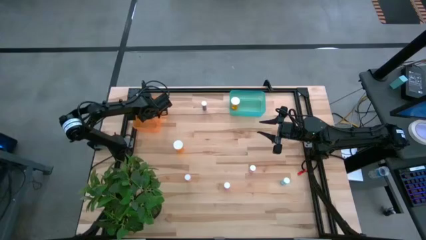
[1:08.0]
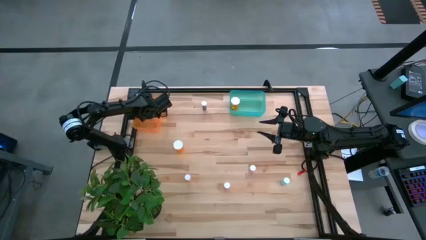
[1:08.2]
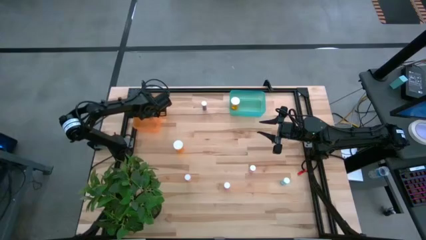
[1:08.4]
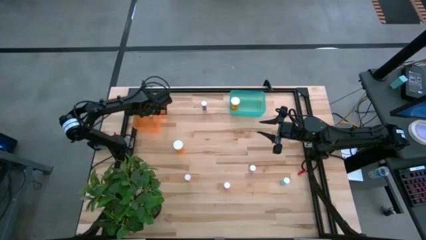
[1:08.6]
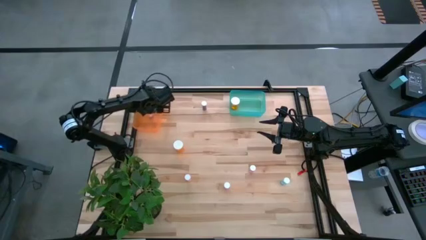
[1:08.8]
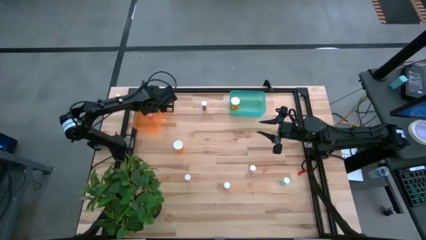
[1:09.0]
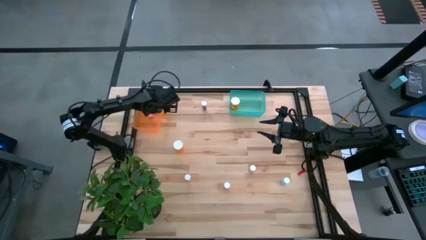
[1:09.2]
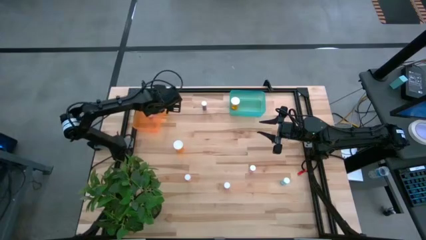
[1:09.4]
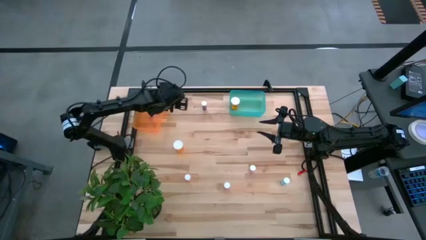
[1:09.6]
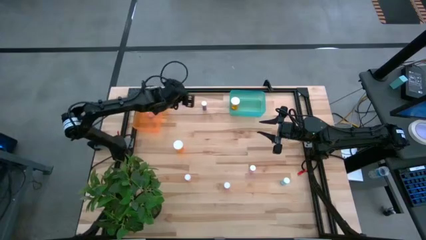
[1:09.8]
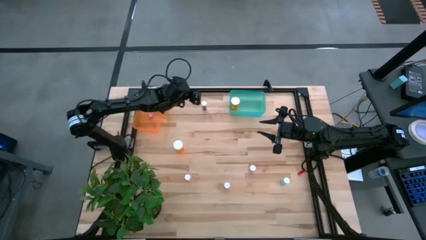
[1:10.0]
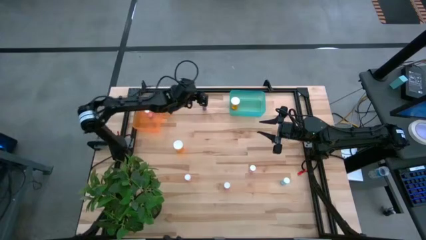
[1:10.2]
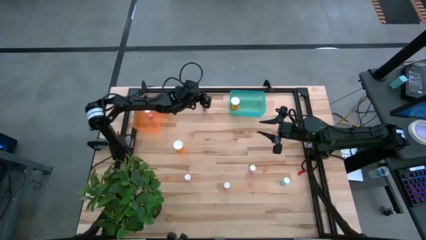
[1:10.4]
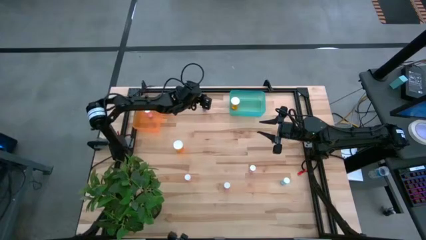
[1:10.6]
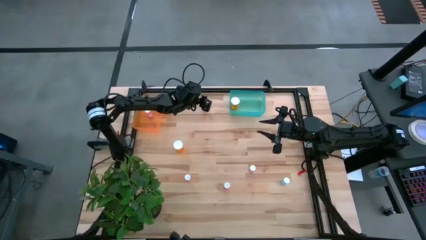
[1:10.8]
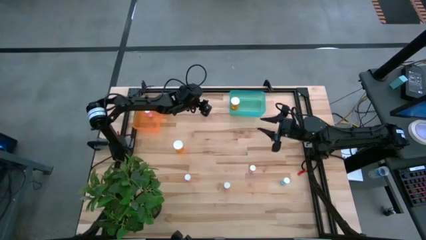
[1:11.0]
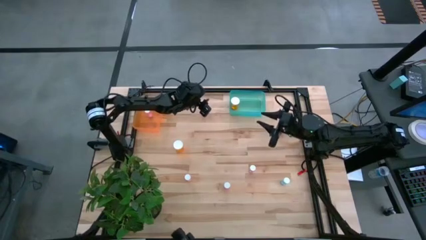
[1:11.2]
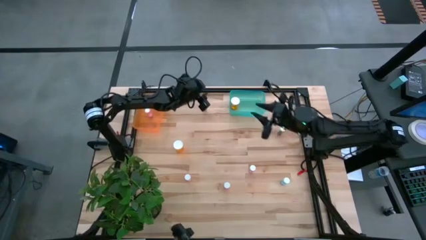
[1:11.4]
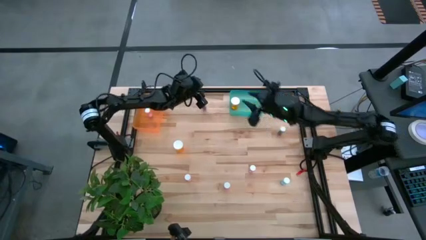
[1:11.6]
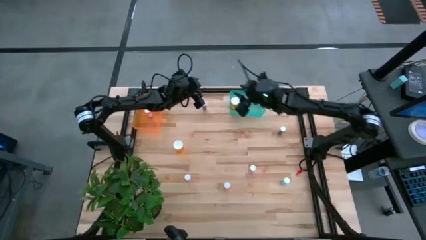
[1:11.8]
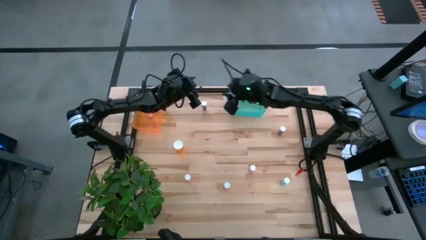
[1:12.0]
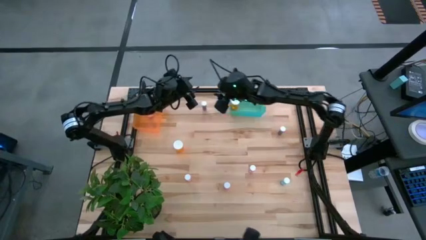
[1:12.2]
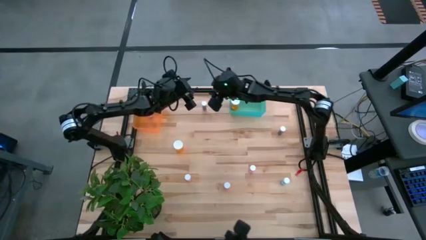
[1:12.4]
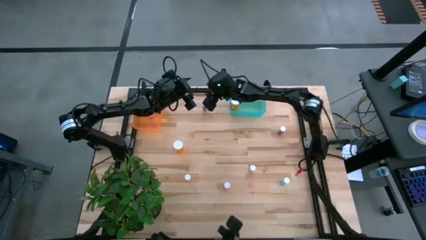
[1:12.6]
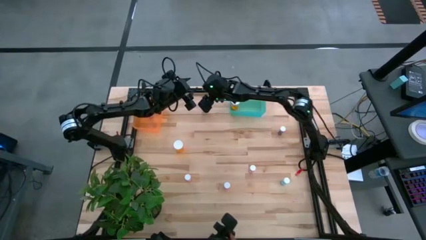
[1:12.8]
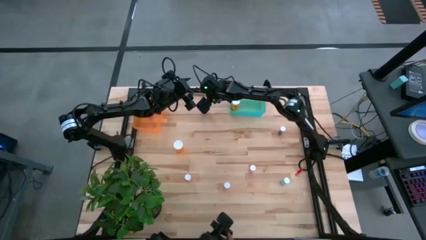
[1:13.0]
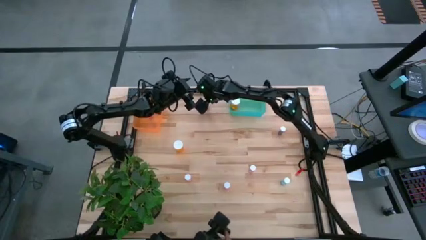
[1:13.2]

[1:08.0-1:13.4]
Task: Pick and place medicine bottles into bin by pill shape (circle, oval)
Put the blue capsule bottle into the green bin

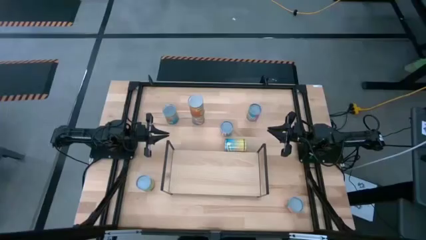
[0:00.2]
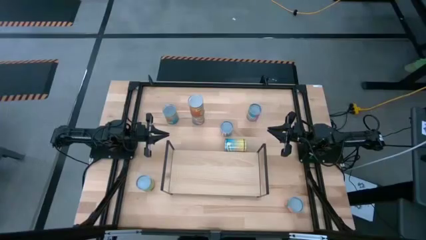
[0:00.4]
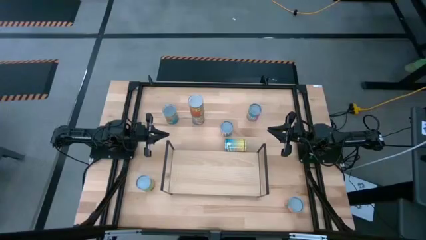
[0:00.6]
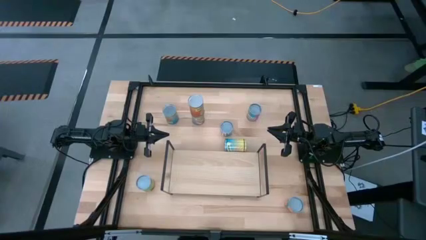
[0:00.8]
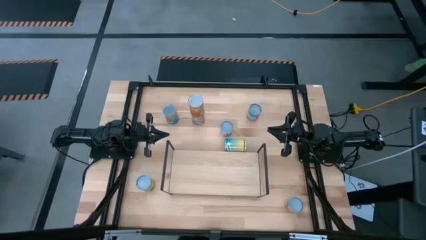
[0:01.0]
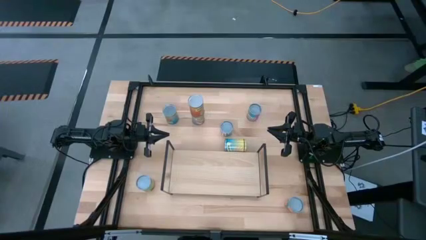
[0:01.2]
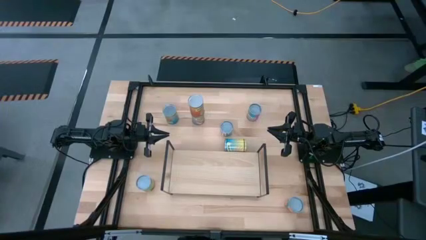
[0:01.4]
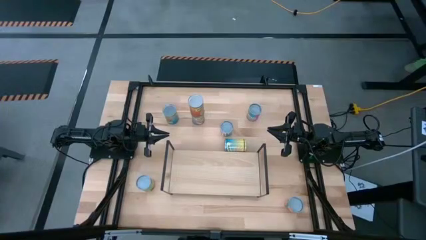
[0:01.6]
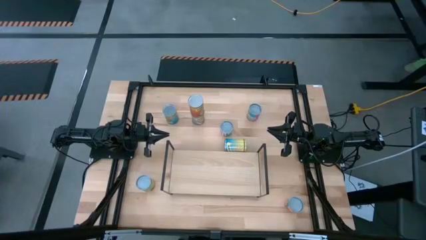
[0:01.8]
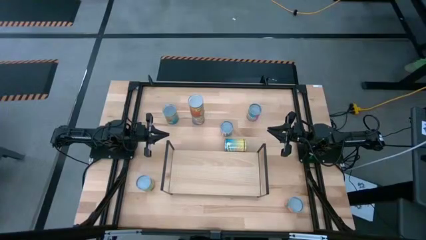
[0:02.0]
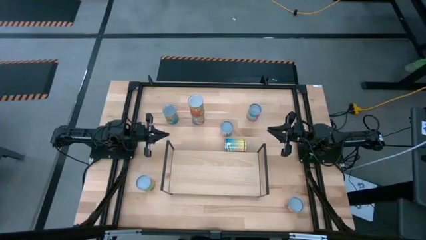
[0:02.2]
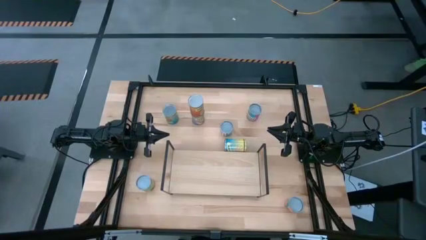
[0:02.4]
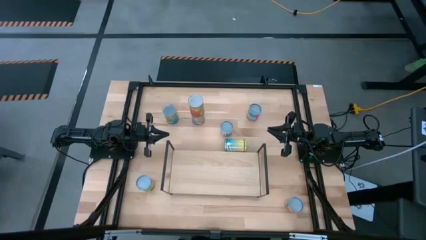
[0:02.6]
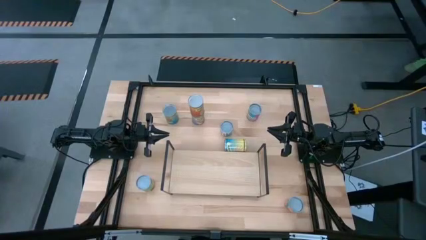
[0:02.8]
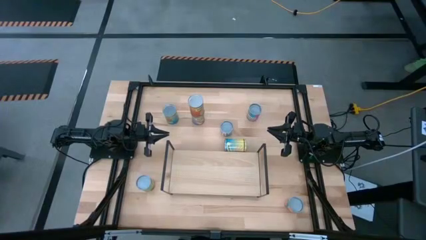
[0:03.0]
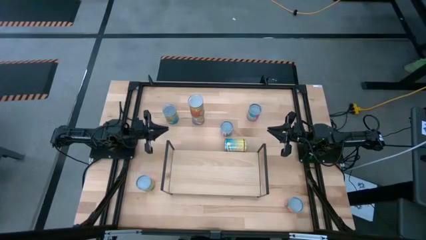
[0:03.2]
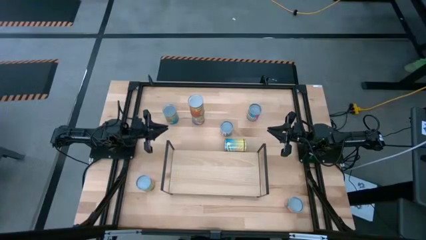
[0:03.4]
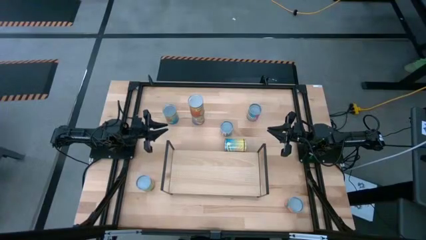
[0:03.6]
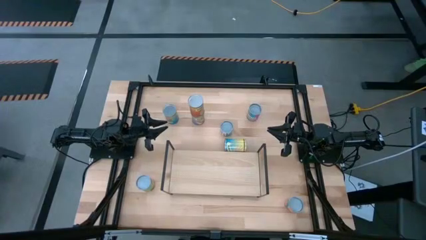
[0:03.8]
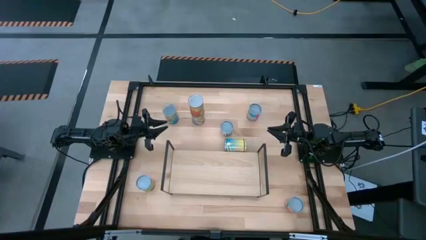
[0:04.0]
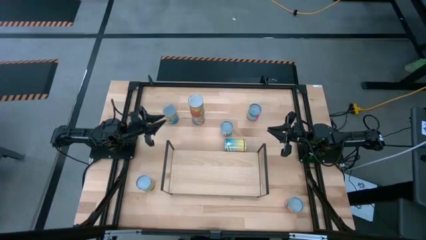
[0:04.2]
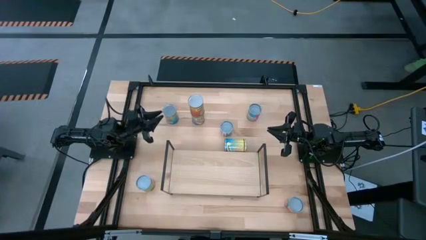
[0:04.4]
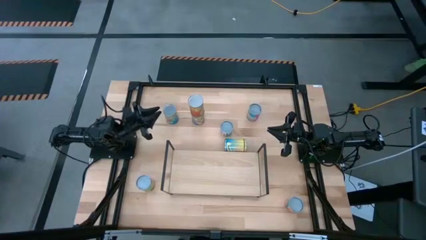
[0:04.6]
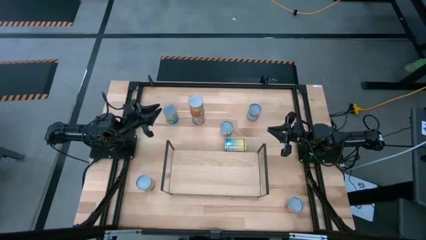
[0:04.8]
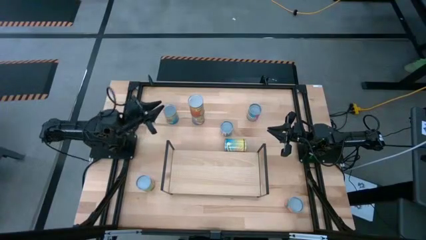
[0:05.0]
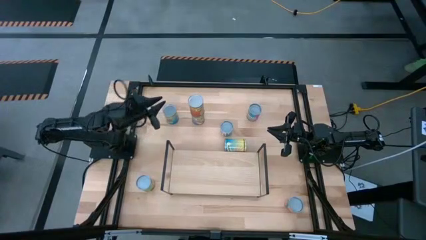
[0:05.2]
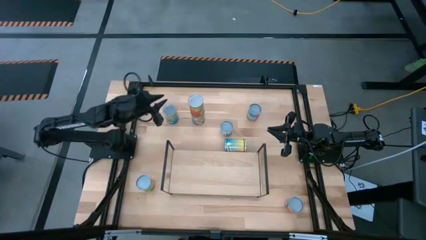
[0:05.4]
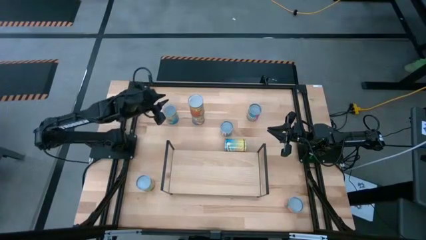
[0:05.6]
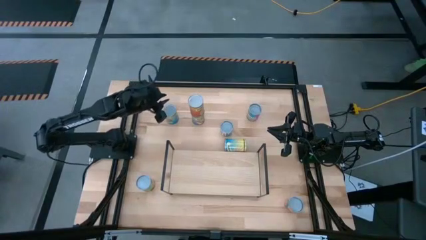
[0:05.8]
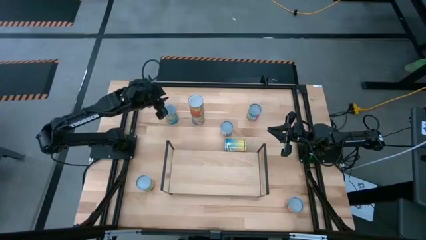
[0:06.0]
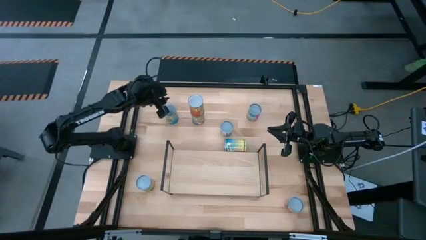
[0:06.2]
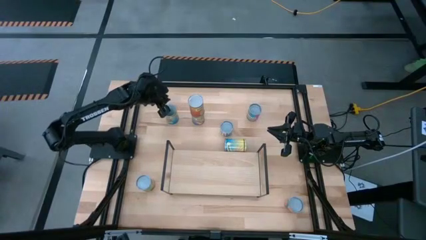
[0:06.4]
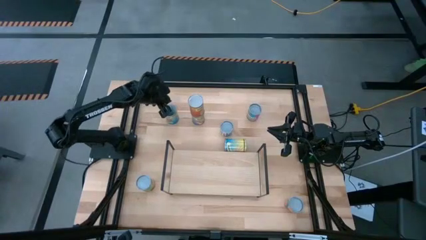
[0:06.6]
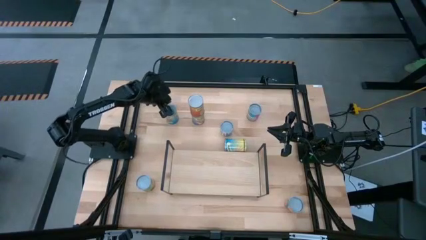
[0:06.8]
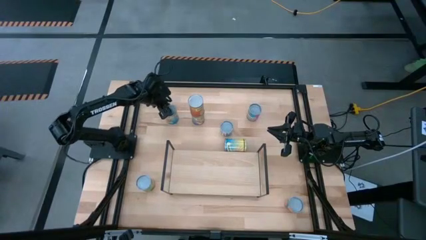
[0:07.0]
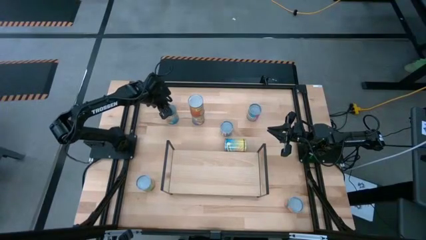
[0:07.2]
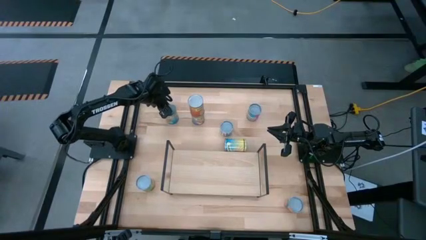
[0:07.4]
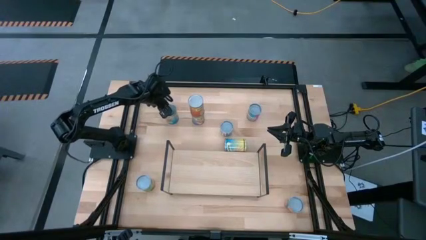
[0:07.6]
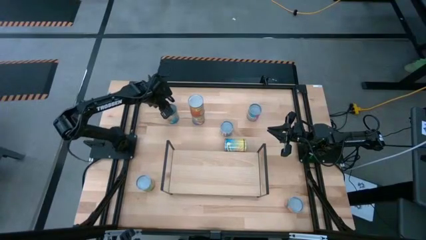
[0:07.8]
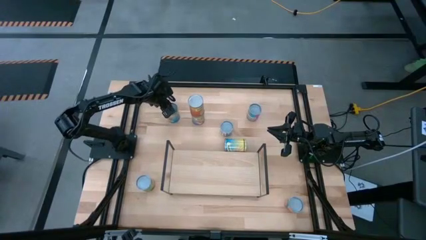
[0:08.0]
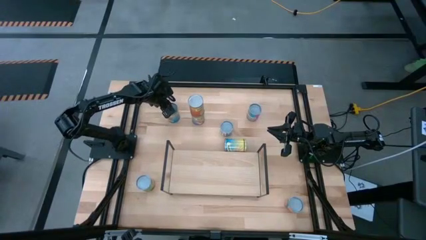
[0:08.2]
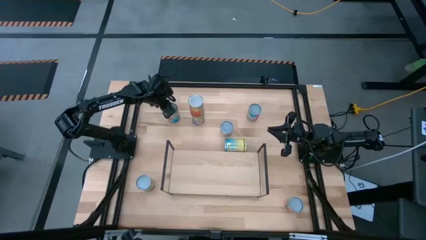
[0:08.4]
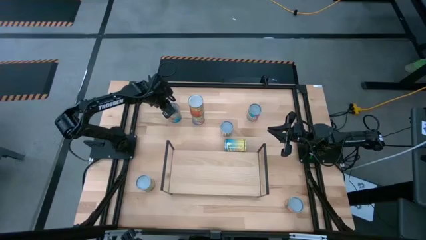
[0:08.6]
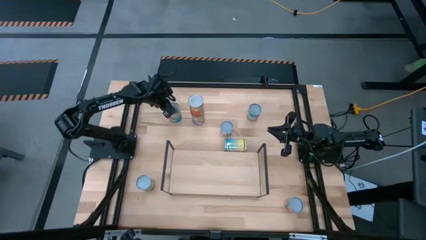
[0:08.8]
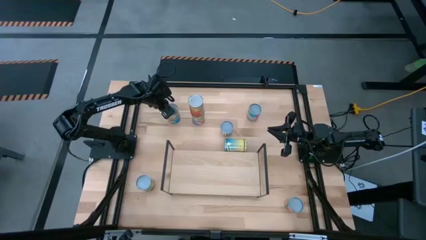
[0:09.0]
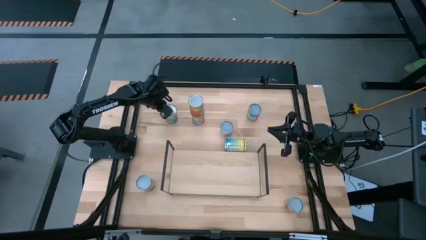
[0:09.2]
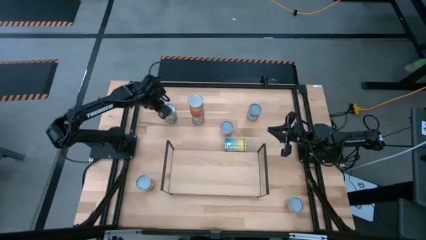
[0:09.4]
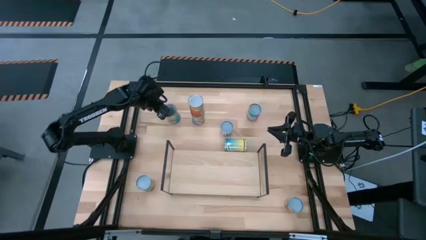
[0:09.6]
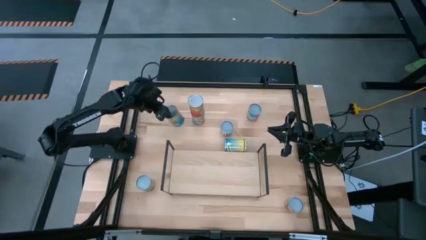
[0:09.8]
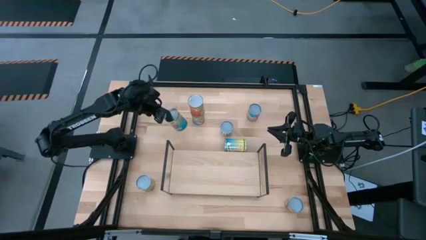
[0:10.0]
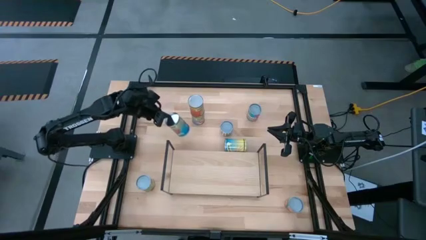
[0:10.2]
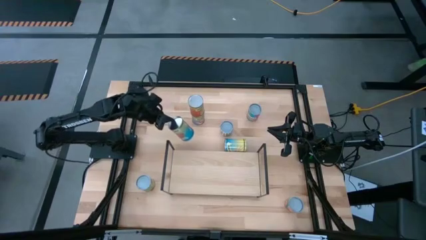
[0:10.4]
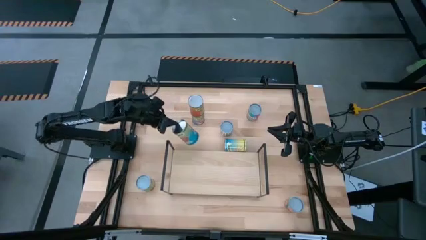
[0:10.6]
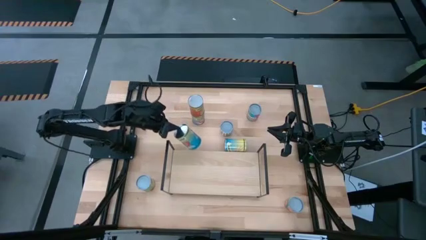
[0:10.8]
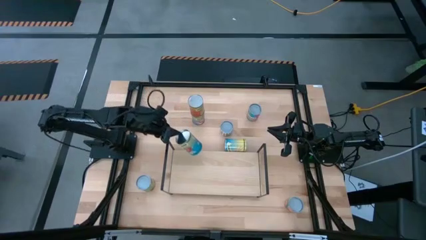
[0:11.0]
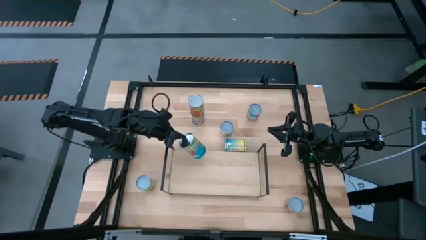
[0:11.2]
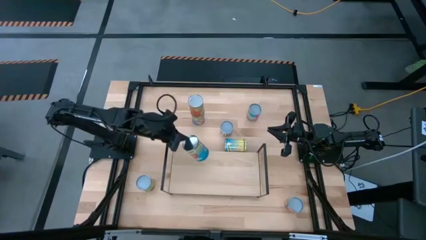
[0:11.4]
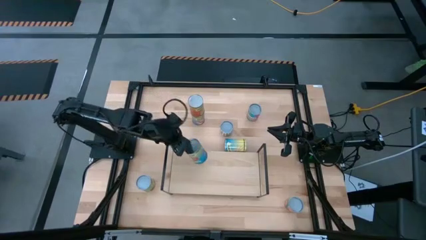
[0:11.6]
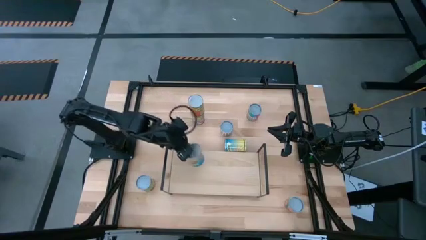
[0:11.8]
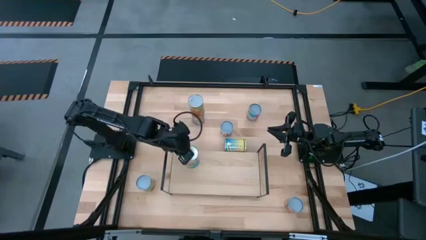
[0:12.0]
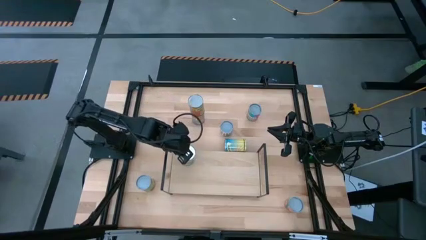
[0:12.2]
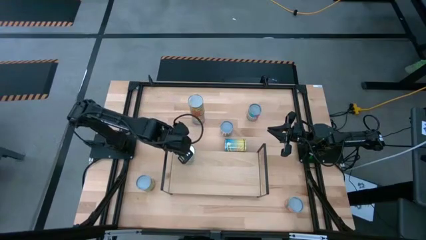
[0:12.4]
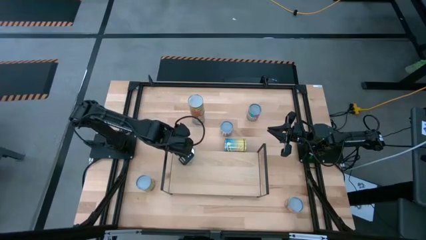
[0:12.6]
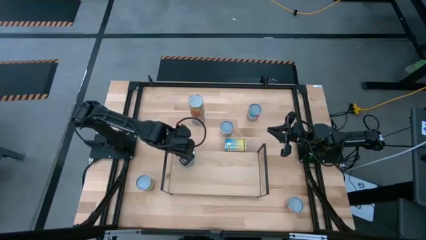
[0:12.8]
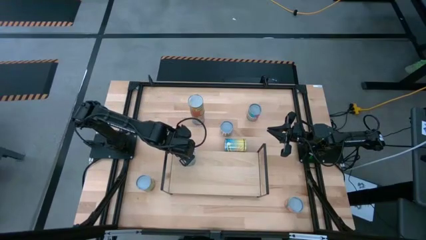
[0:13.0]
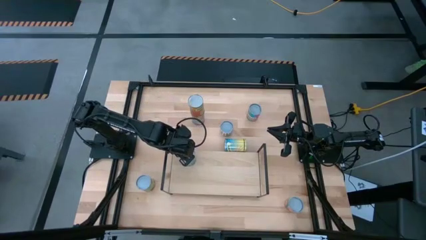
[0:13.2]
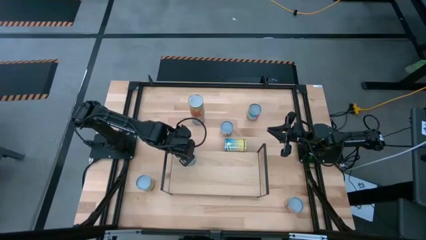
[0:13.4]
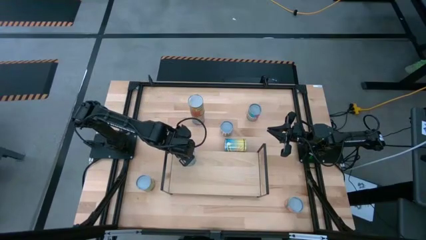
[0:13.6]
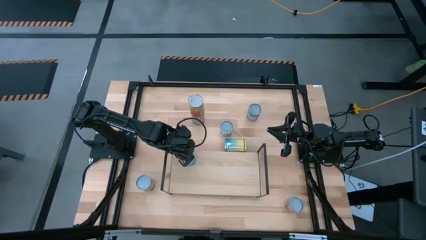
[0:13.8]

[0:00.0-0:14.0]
Task: Pick and place cans onto a shelf
Put the yellow blue canned tomatoes on the shelf
